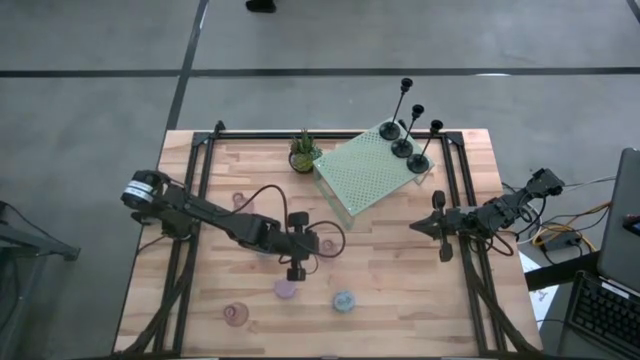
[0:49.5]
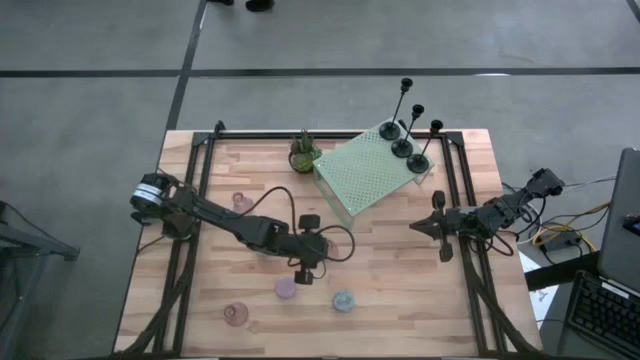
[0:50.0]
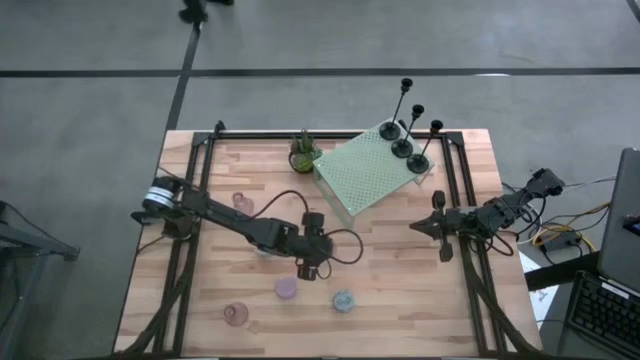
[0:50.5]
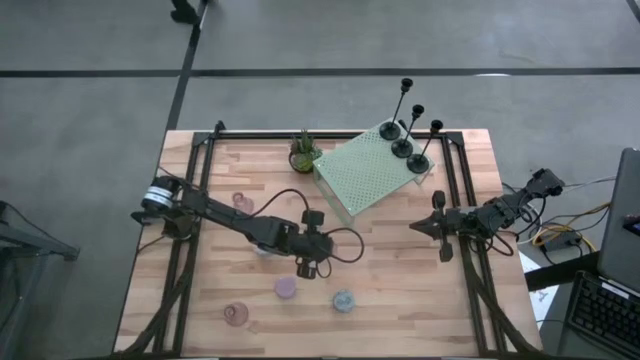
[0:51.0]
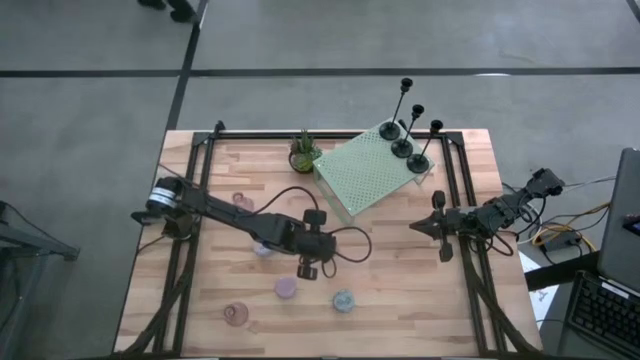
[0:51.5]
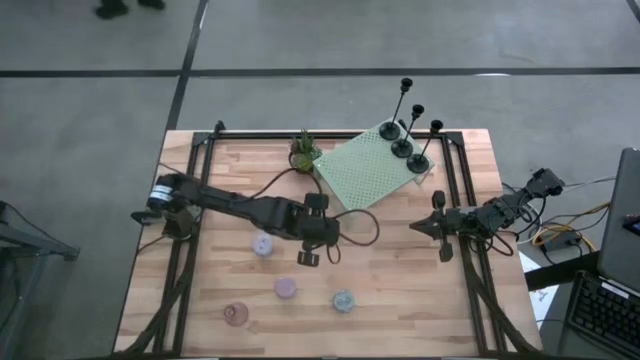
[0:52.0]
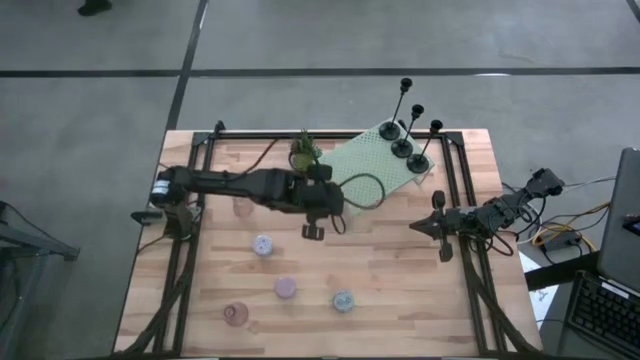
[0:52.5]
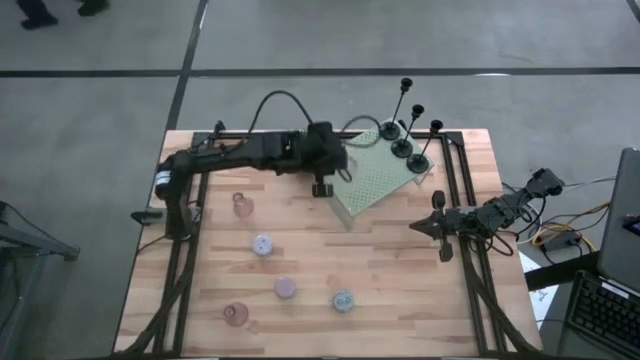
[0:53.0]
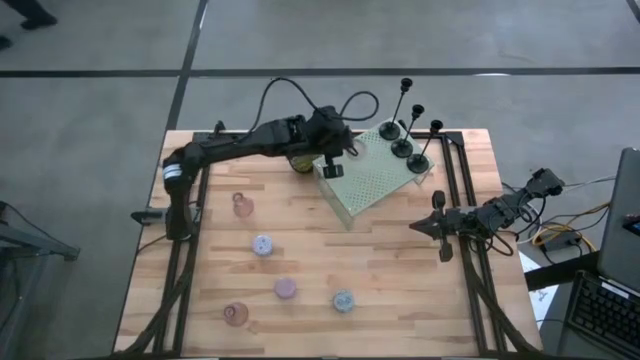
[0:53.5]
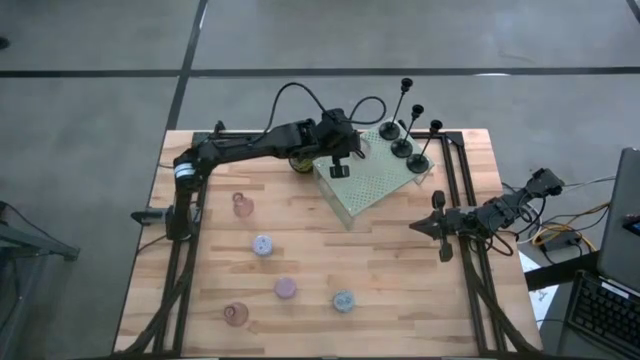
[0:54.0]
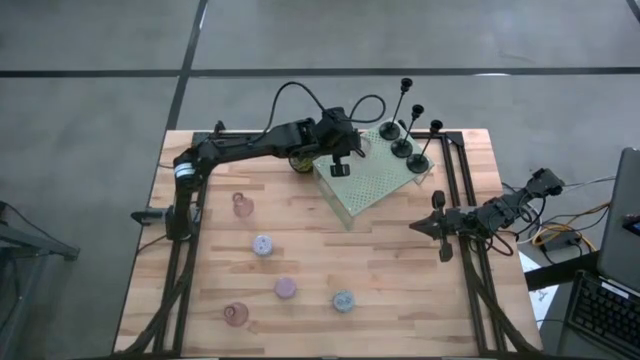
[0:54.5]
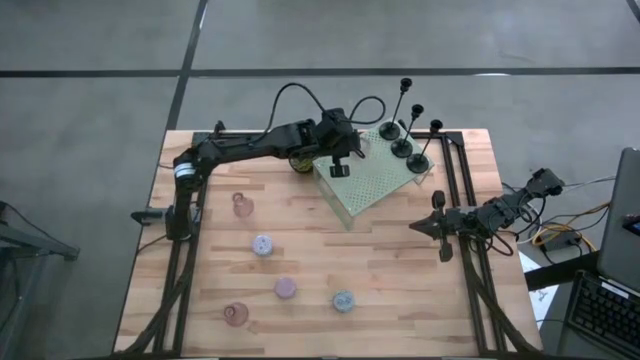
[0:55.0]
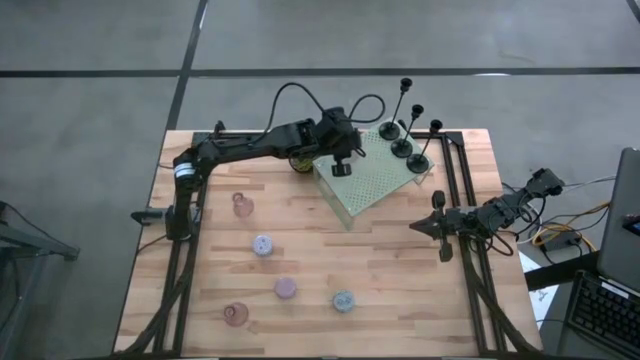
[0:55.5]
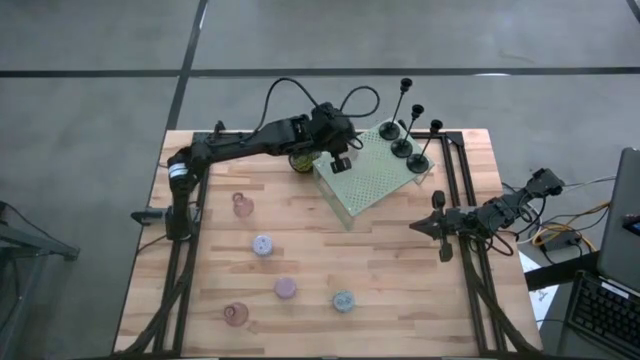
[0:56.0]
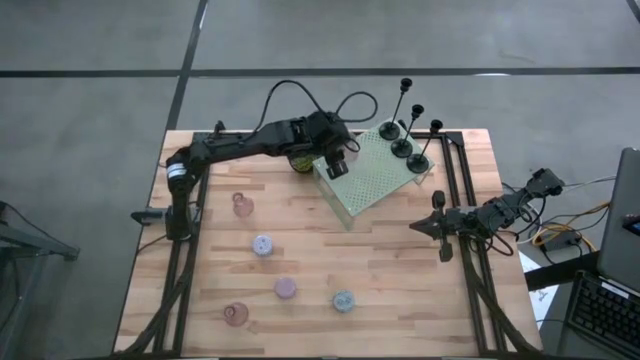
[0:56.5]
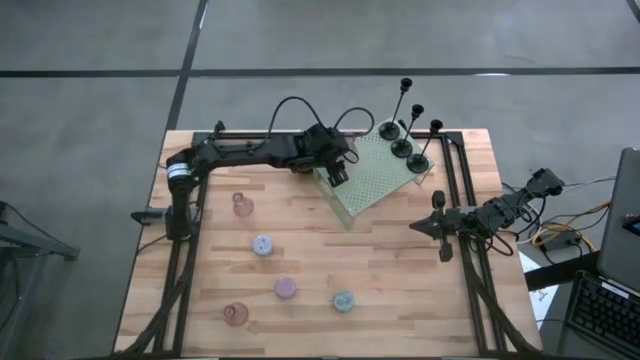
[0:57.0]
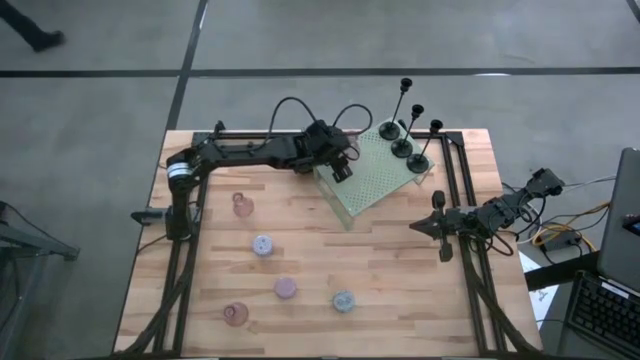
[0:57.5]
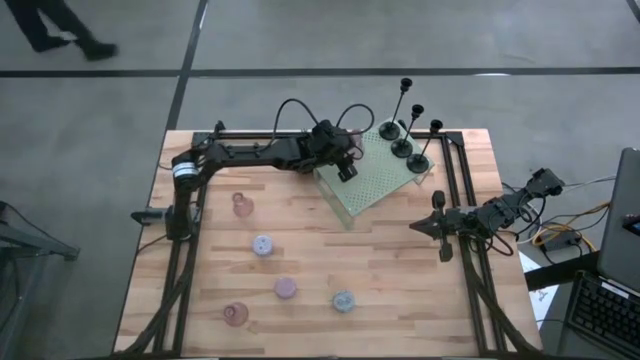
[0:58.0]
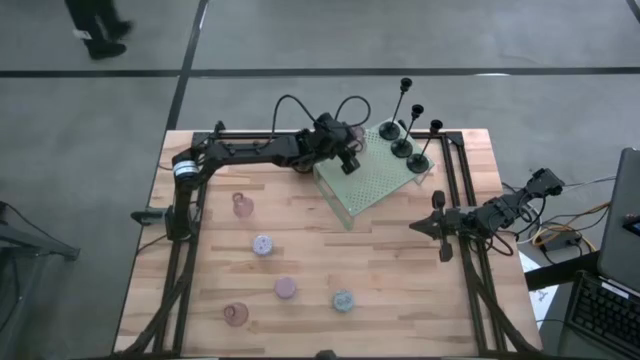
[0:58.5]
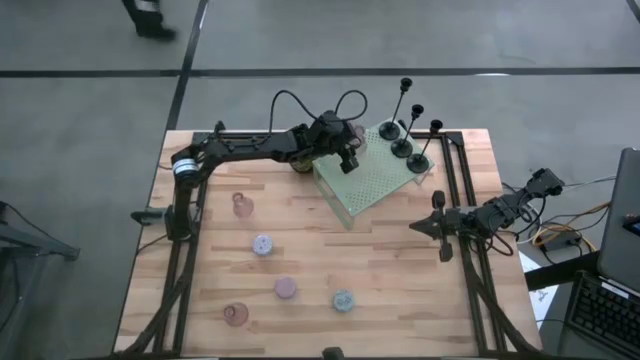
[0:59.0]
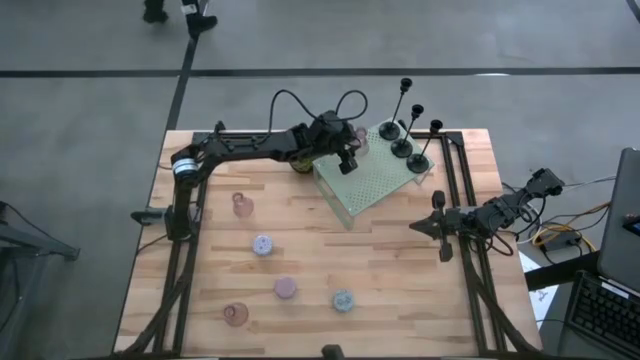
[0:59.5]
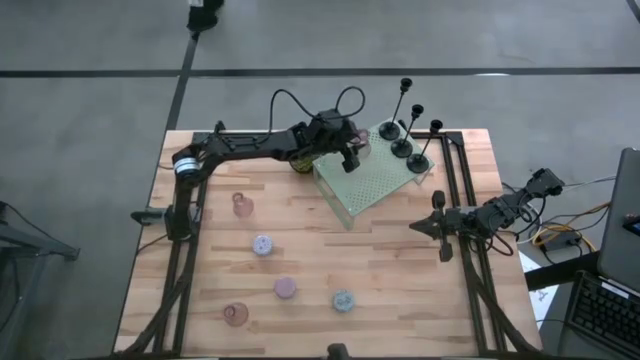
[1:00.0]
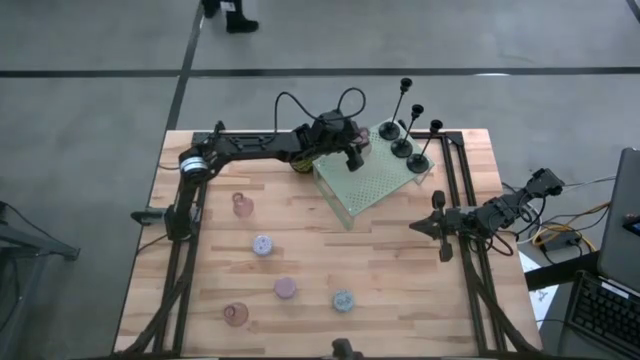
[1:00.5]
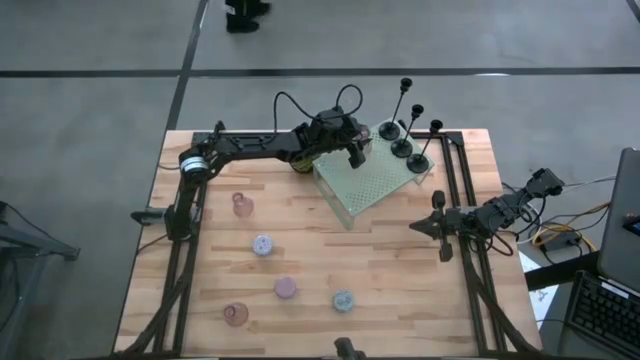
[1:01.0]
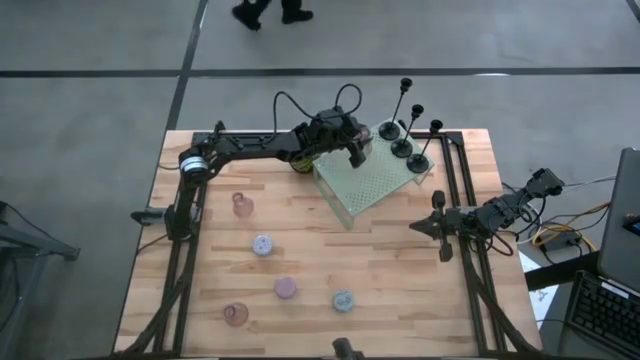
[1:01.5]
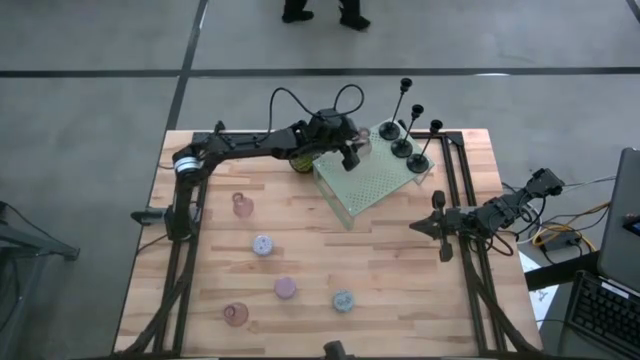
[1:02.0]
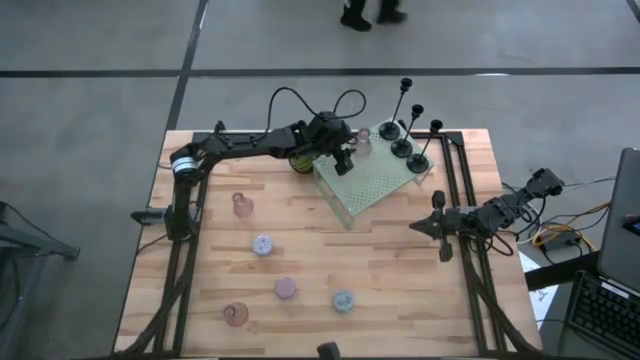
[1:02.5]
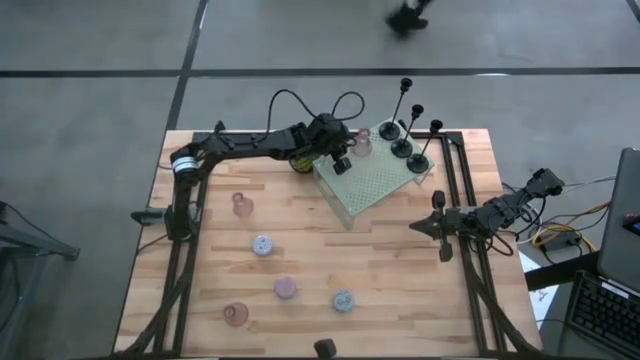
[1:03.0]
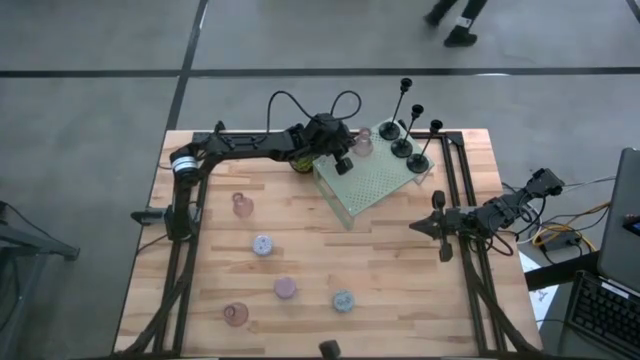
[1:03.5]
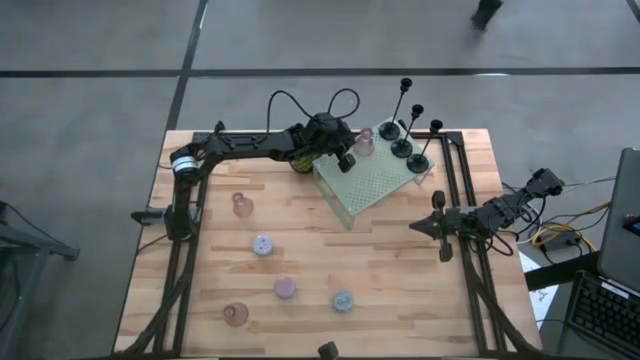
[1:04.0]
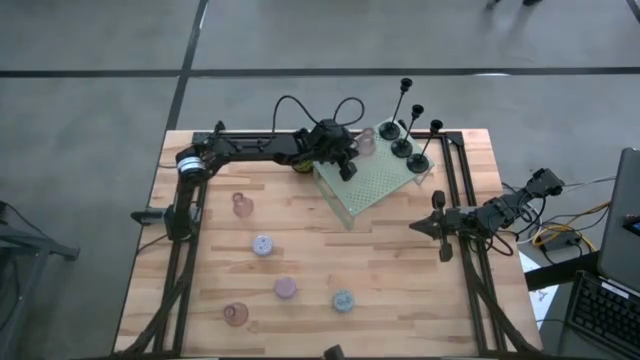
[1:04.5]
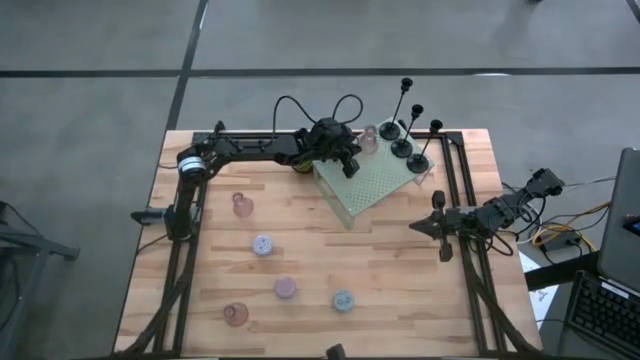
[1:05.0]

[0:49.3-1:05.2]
Task: Pick & Place candle stick holders
Put the right pink candle holder on the shelf

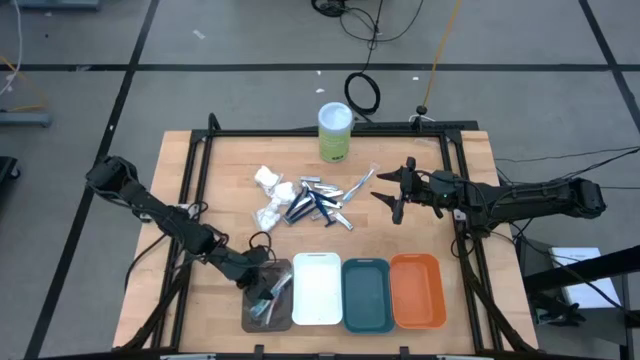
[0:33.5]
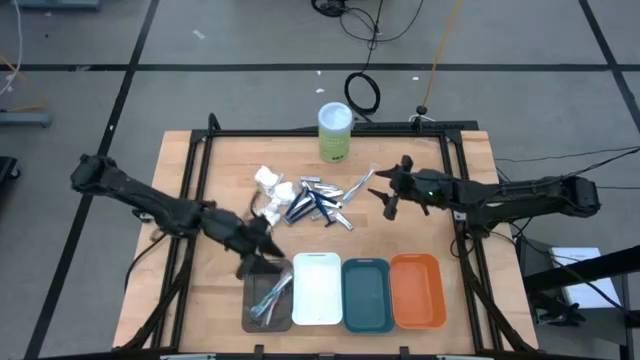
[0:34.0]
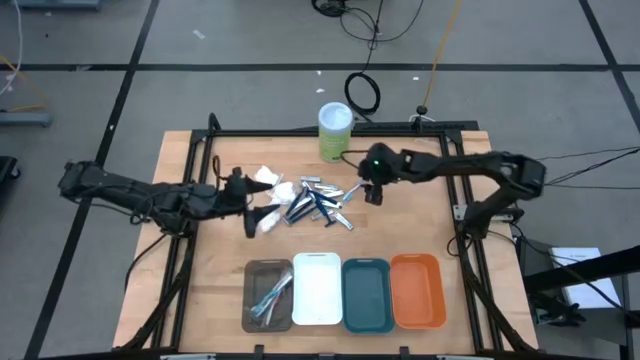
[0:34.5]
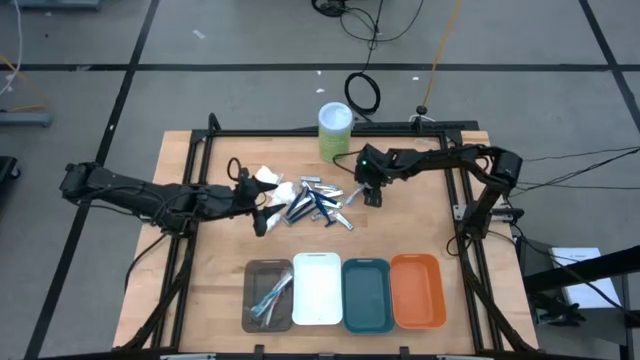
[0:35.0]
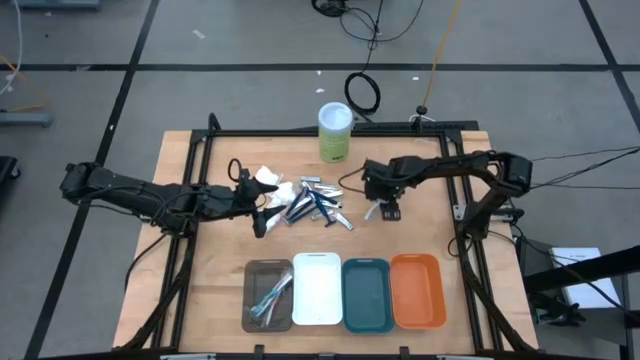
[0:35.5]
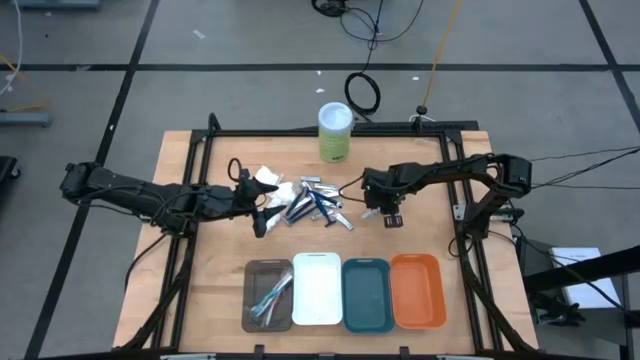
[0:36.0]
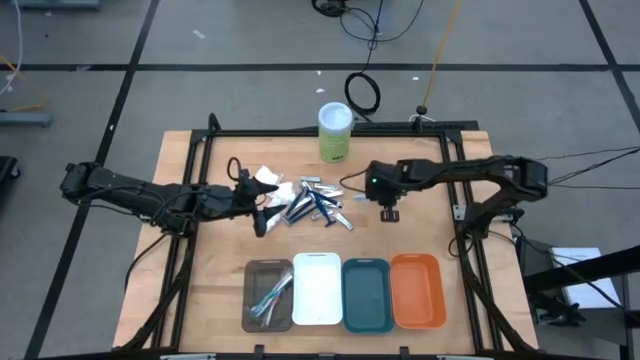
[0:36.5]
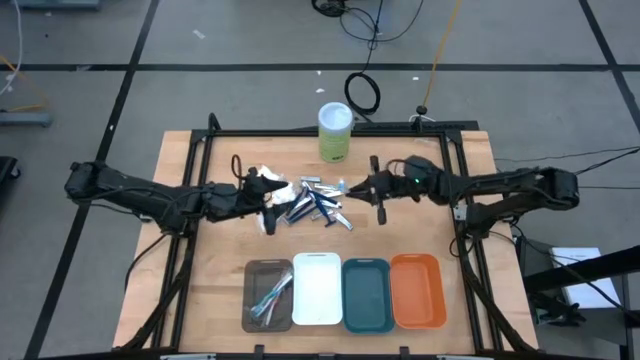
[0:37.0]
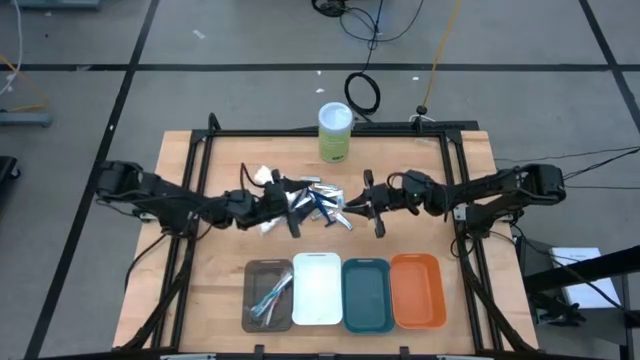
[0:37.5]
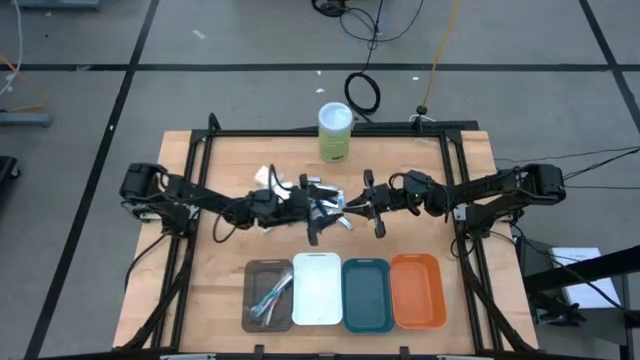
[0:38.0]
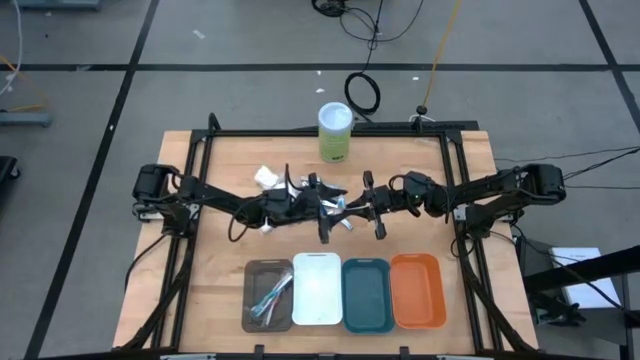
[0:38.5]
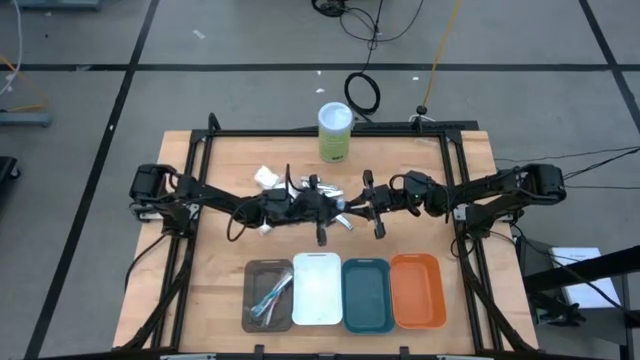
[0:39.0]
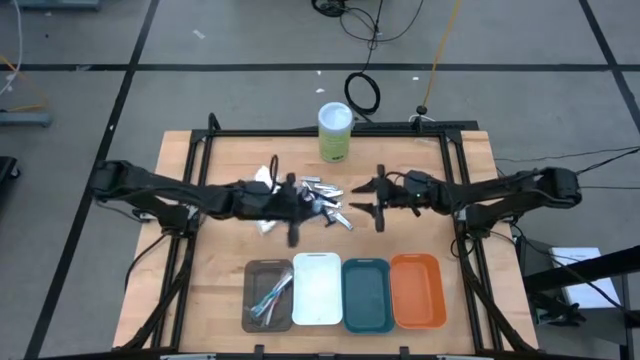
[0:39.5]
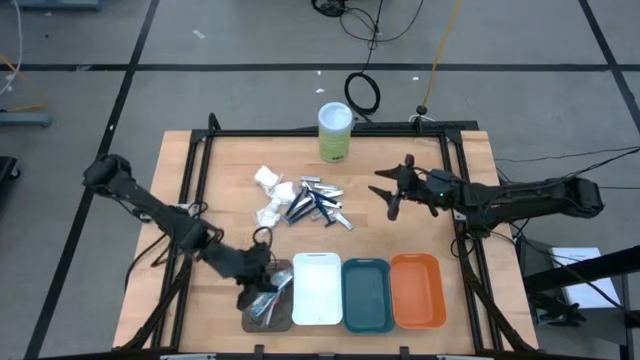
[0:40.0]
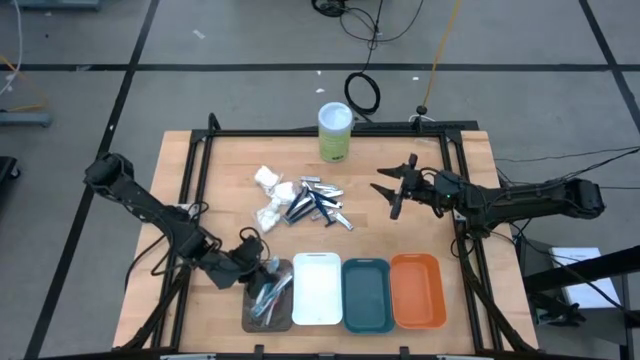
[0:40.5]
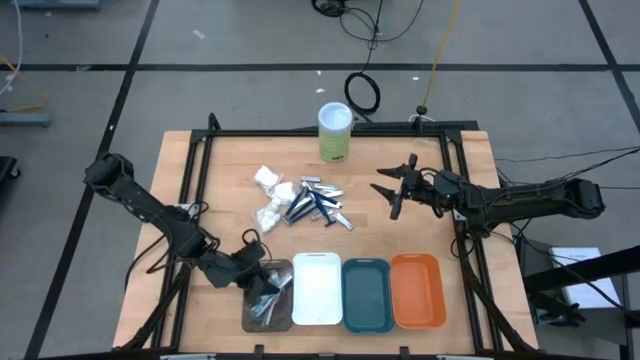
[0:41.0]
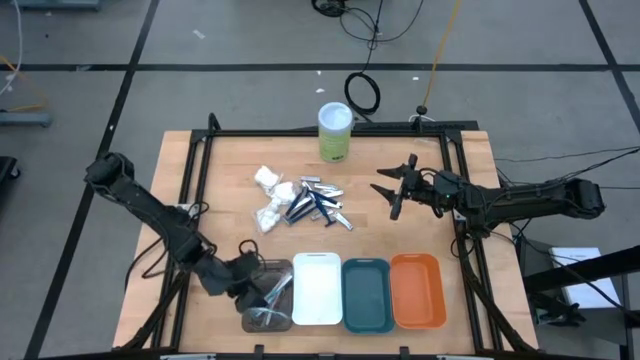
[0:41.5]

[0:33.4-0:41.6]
Task: Pick & Place Travel size toiletries
Put the blue toothbrush into the black bin
